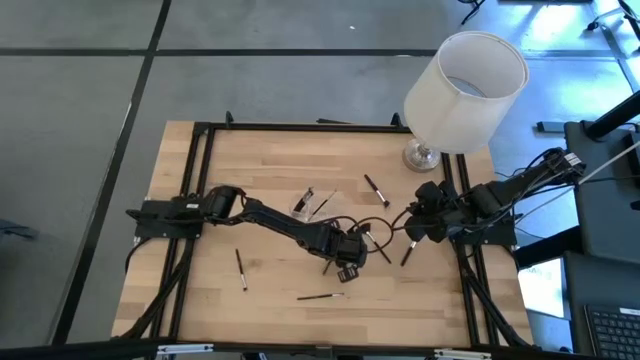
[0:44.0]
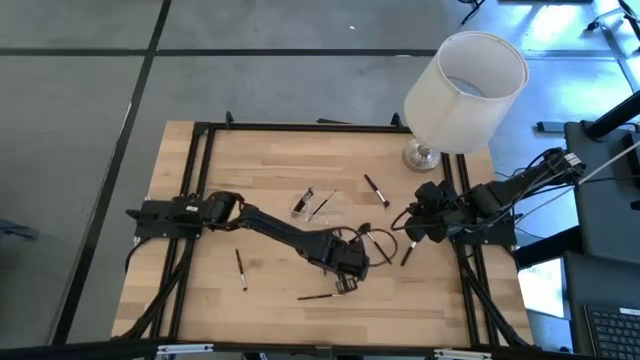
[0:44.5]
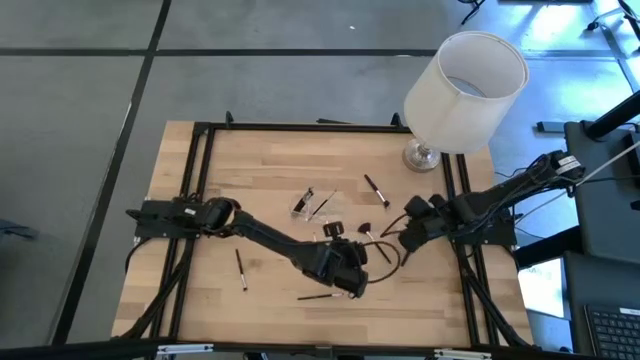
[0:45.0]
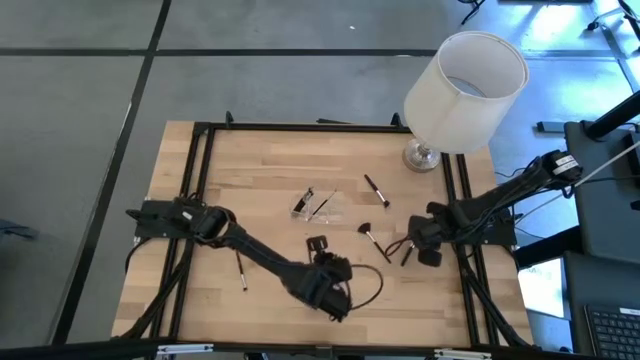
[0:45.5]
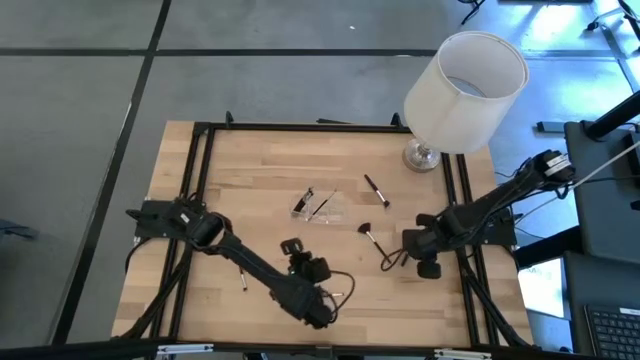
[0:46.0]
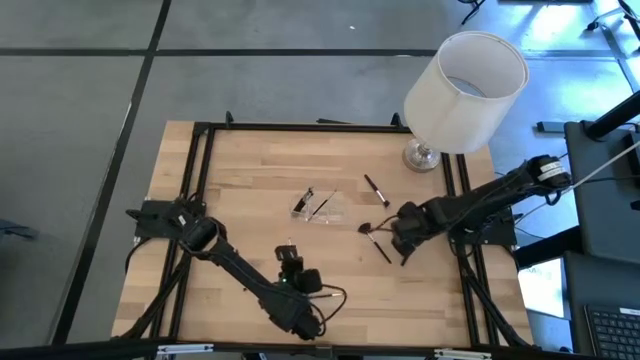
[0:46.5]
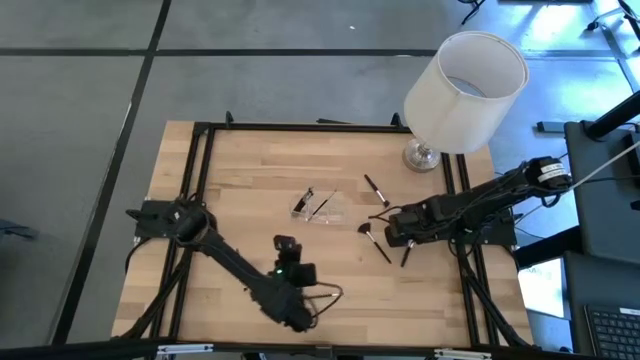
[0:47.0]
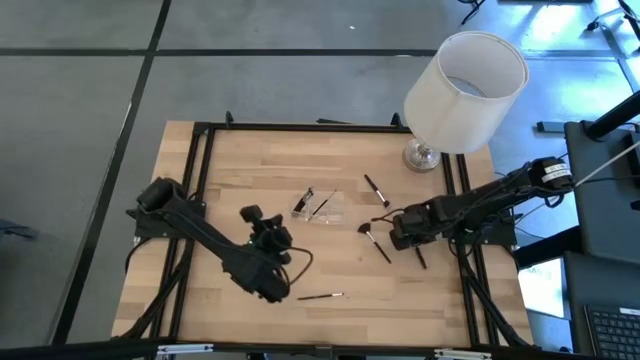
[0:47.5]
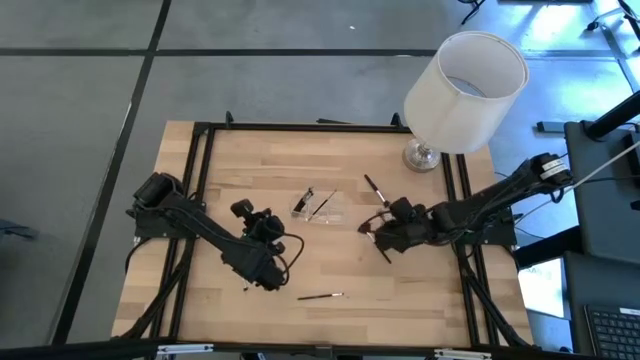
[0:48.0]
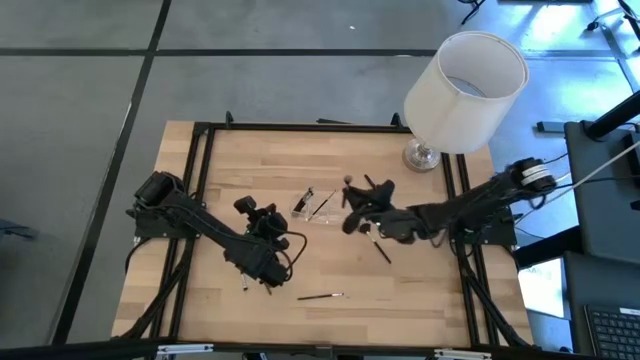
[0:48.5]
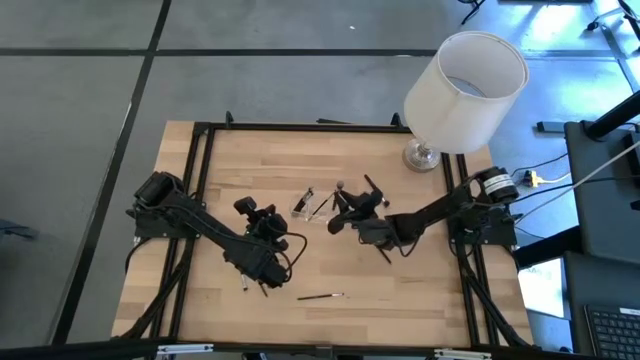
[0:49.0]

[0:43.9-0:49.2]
Task: Put items in baskets/containers
Put the blush brush into the transparent organizer

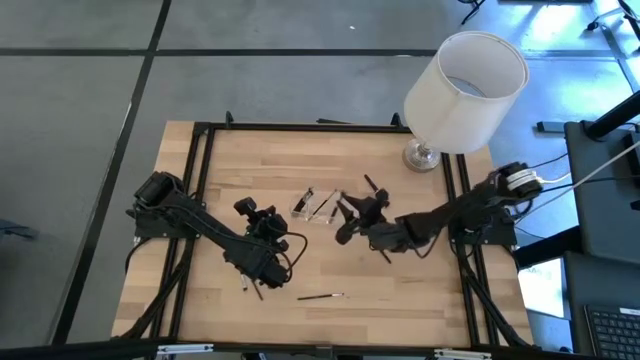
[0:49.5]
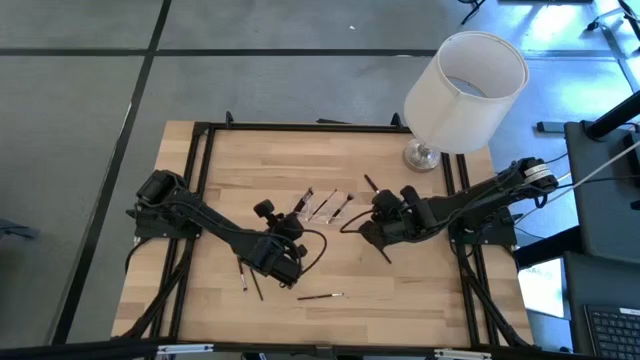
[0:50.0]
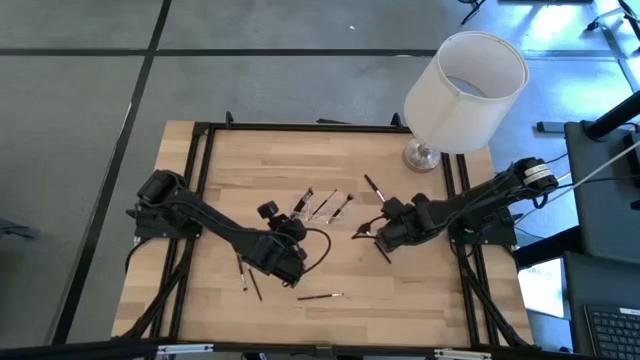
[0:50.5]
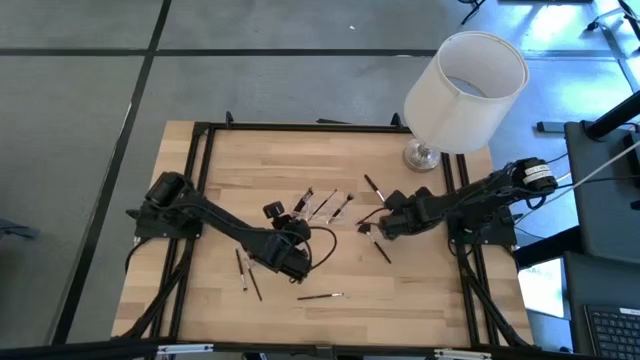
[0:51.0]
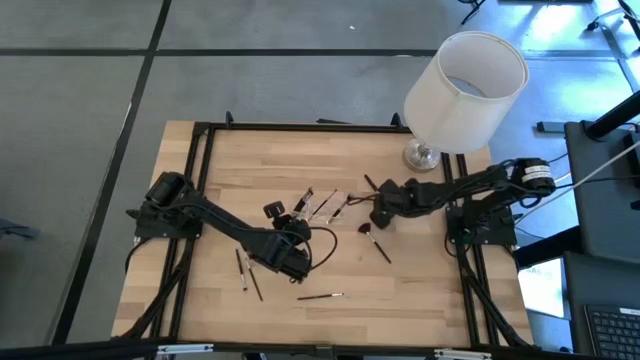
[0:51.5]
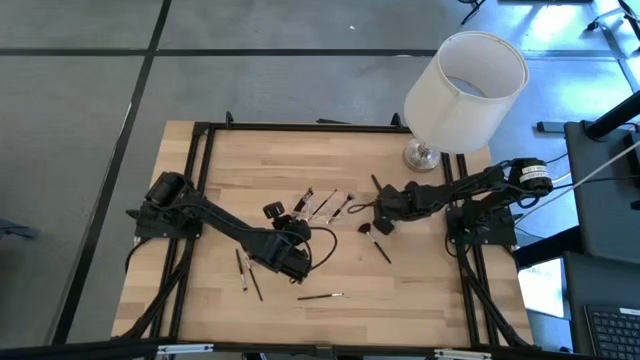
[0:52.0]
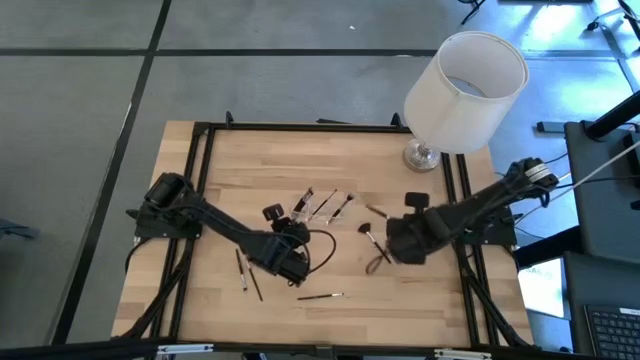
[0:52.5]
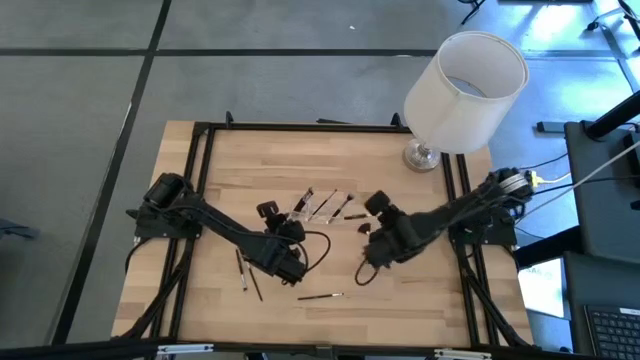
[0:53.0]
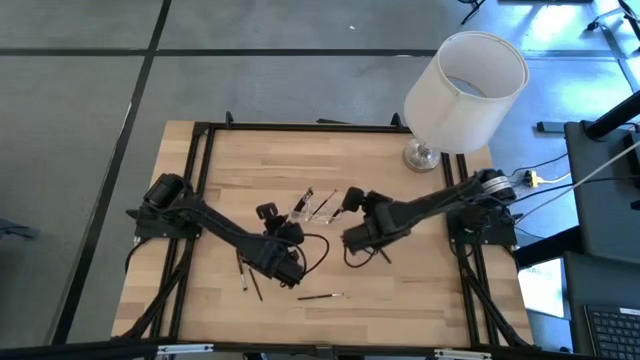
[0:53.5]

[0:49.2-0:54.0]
Put the blush brush into the transparent organizer

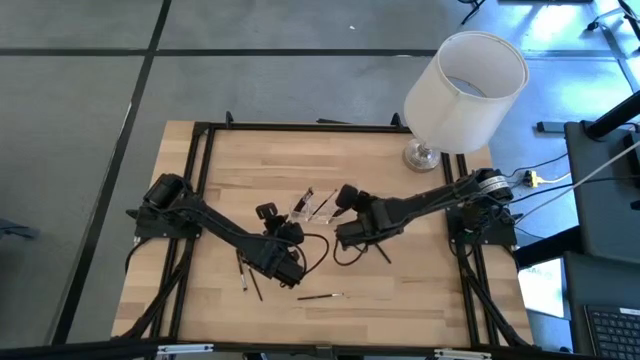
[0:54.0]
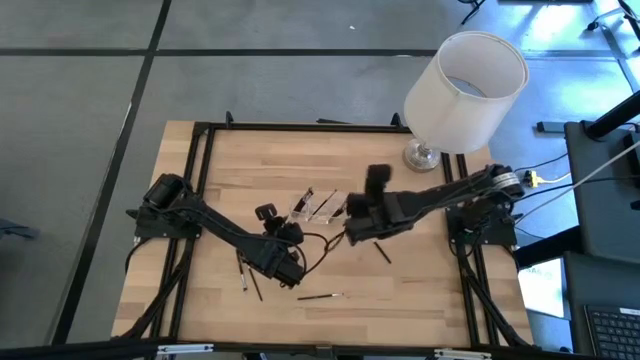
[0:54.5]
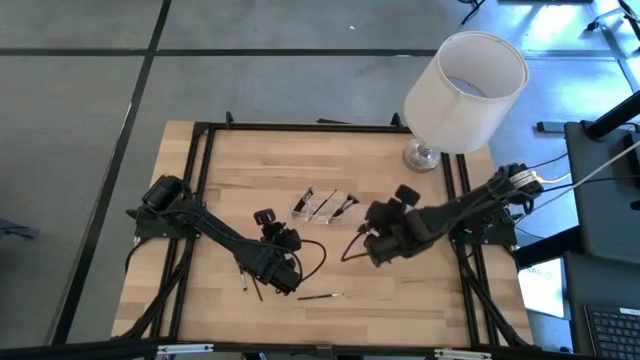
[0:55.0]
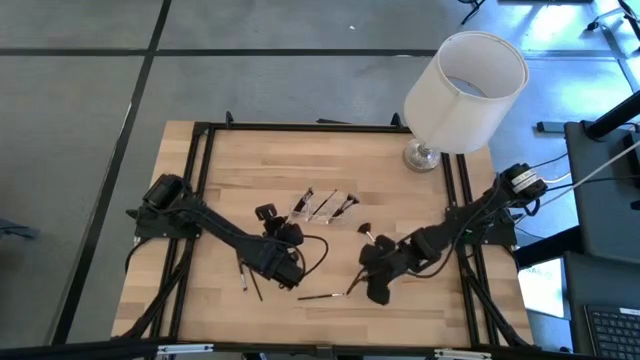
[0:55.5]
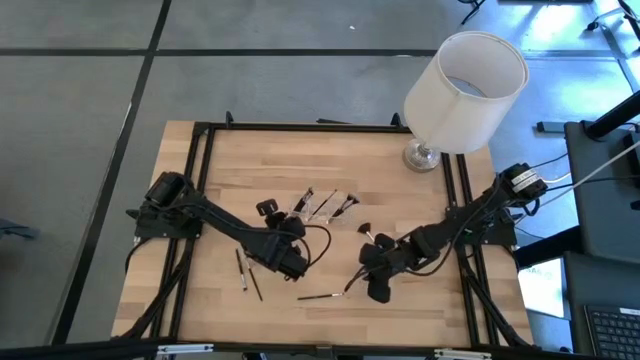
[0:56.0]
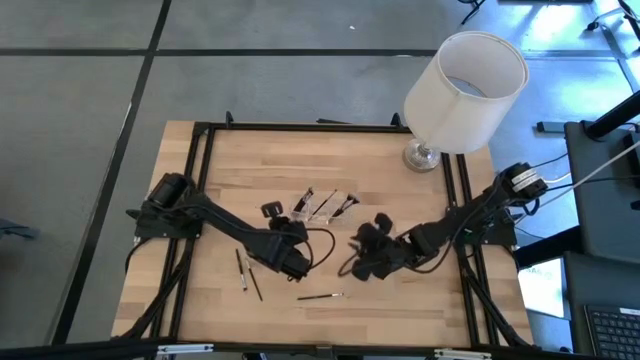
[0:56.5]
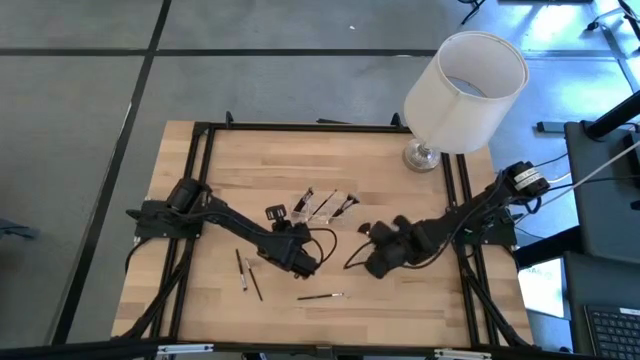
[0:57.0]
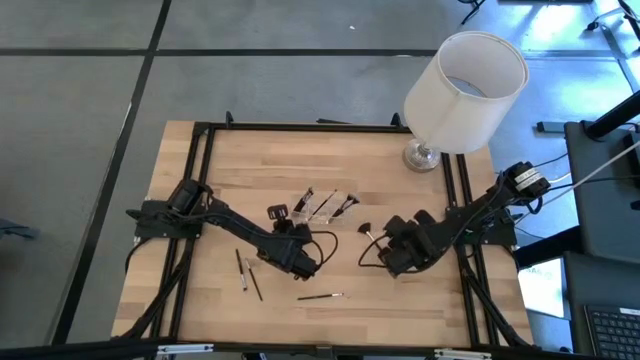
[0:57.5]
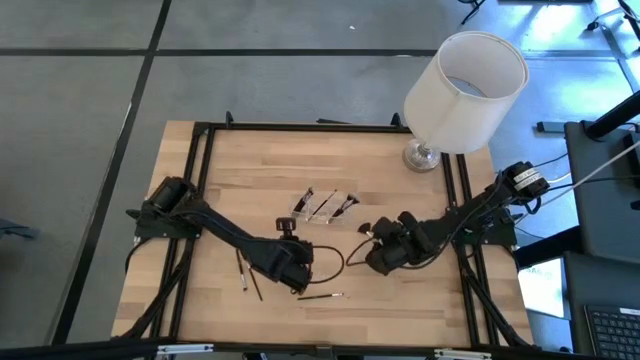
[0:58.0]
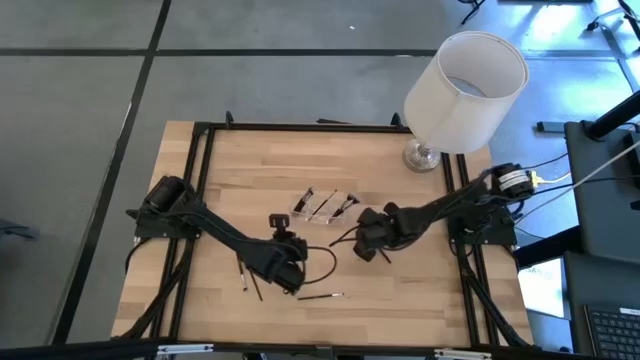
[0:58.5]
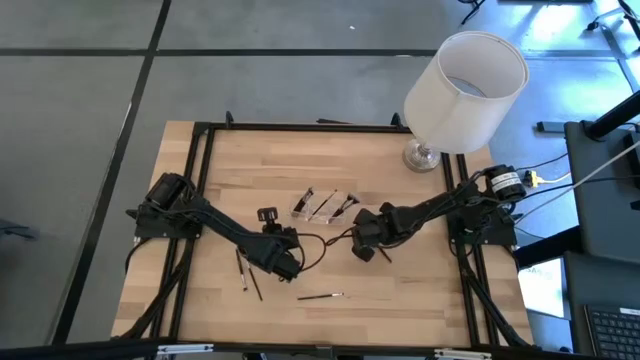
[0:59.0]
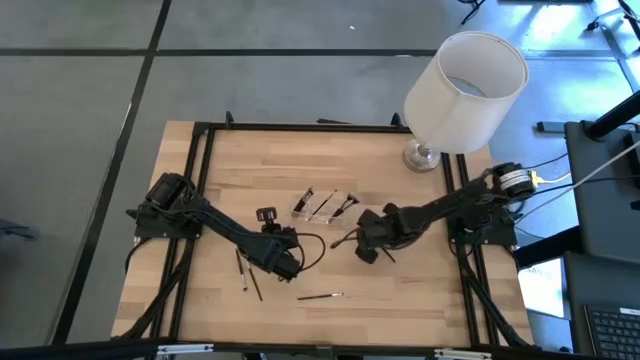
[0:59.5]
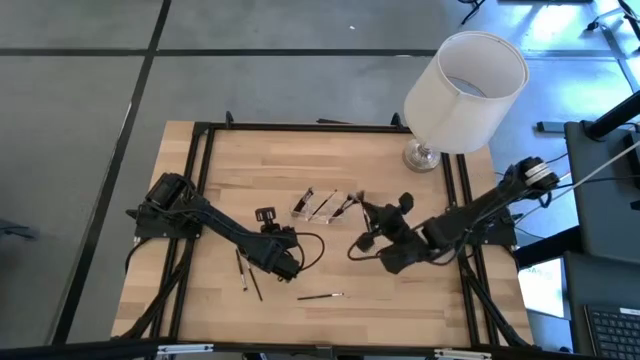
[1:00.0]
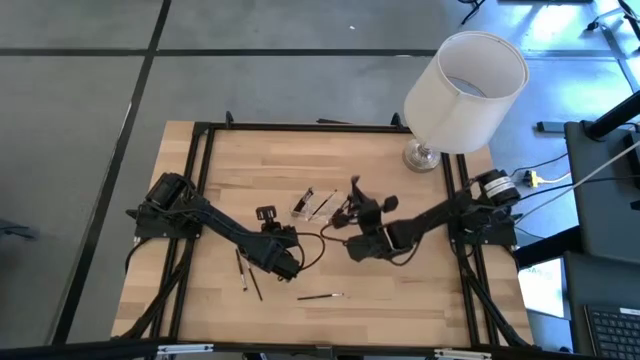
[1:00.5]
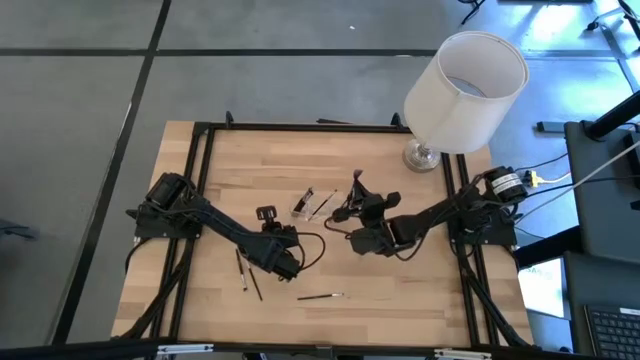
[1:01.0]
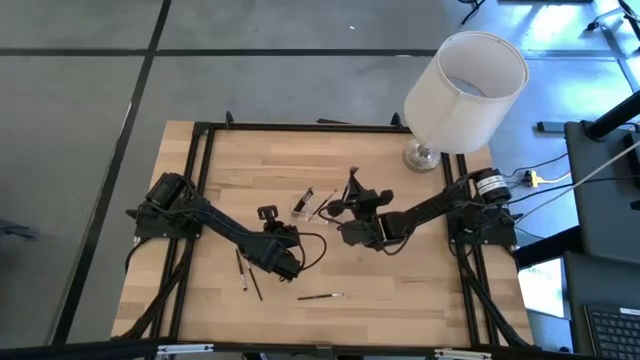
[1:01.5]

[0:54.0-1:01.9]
Put the highlighter brush into the transparent organizer

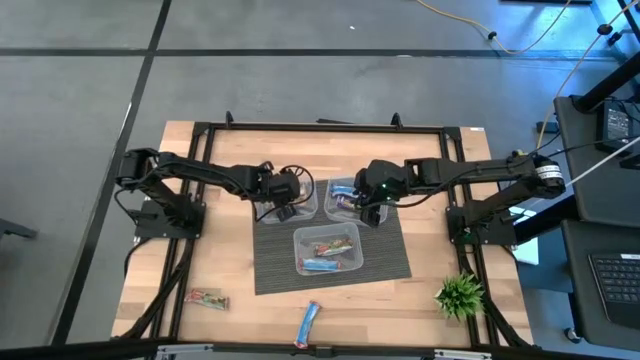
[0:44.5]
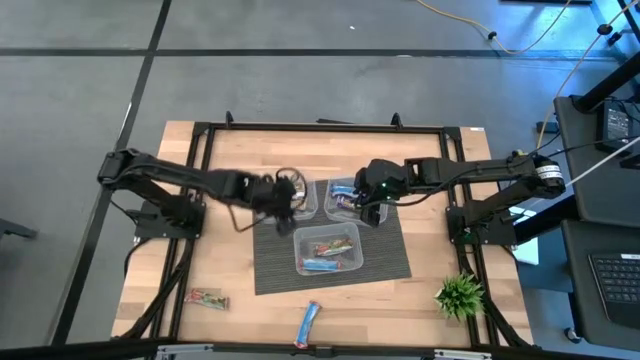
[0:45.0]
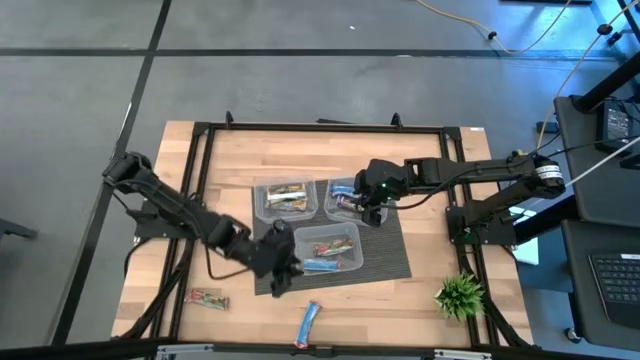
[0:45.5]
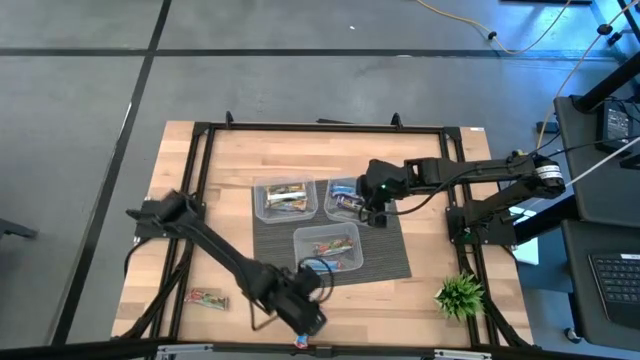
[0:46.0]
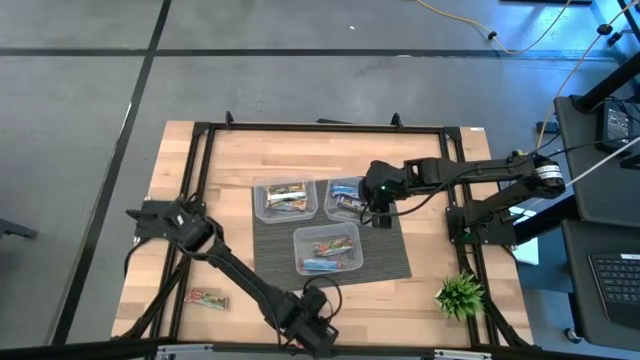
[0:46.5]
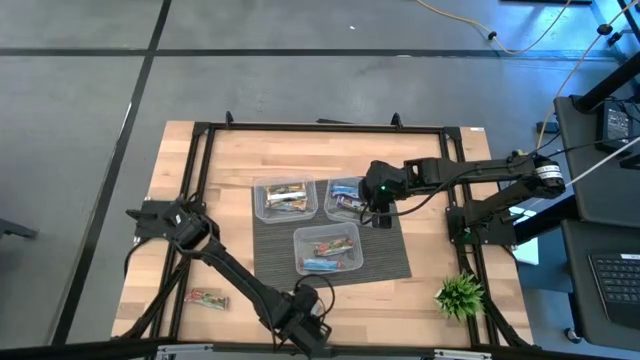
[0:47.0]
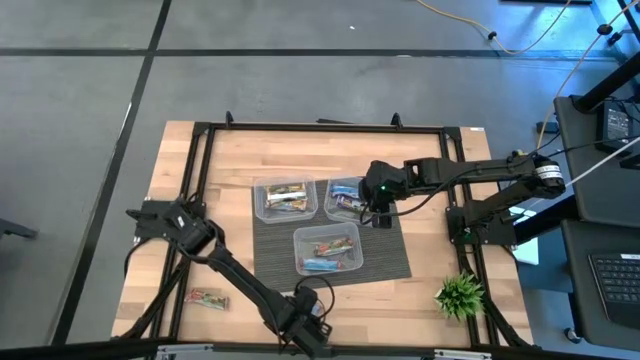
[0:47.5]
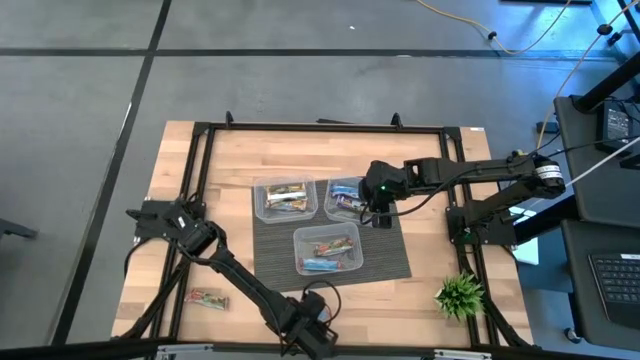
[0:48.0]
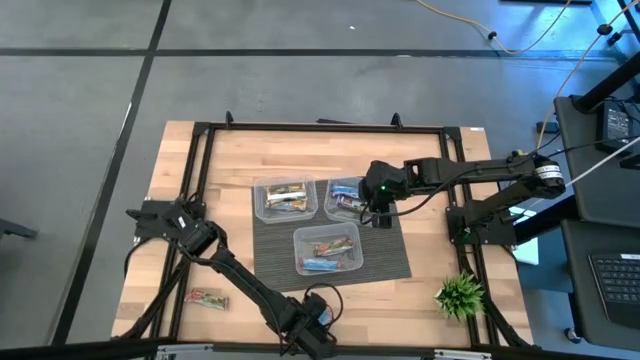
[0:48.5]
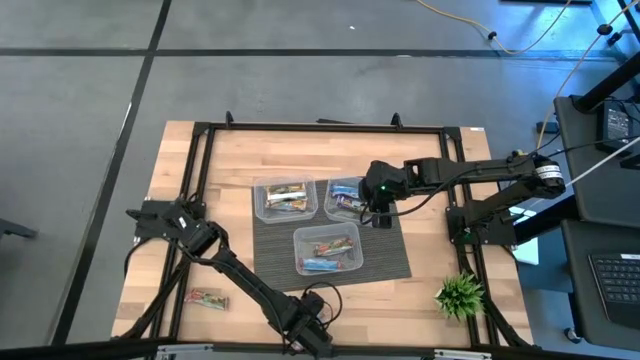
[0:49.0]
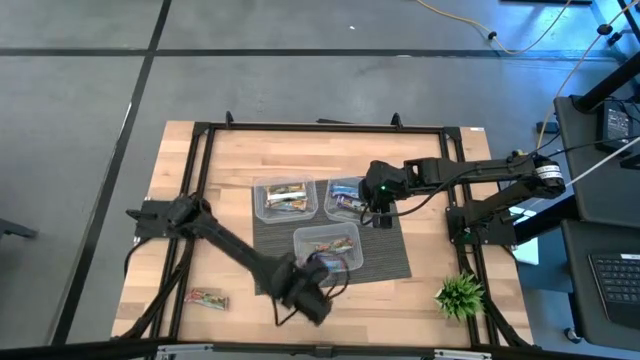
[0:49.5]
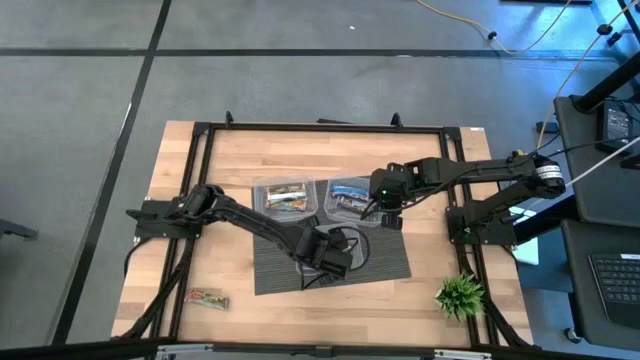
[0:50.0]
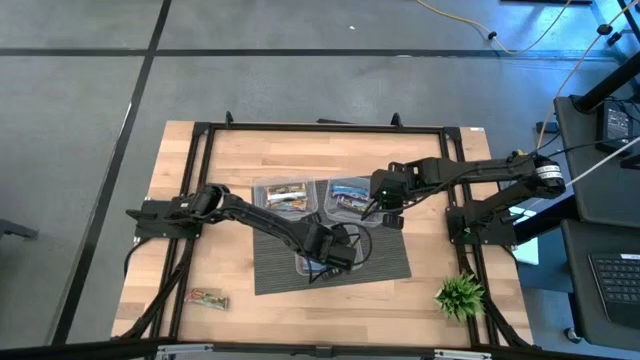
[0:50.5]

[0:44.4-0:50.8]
Task: Pick and place Granola Bars by type
Put the red granola bar into the bottom transparent bin
